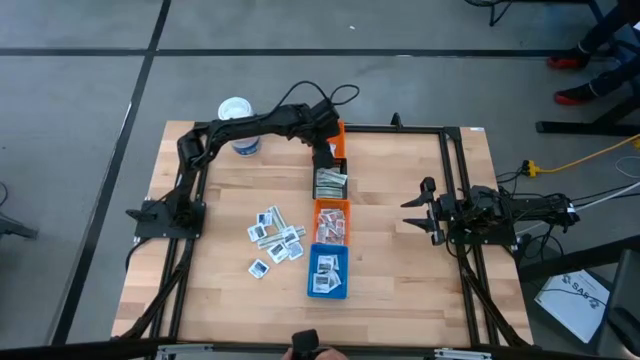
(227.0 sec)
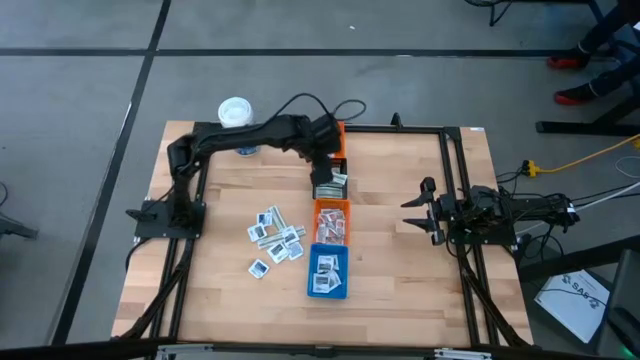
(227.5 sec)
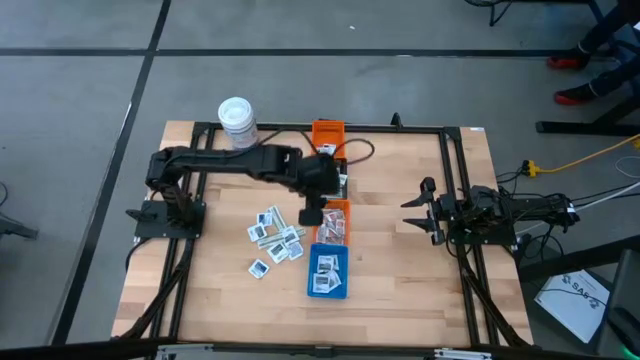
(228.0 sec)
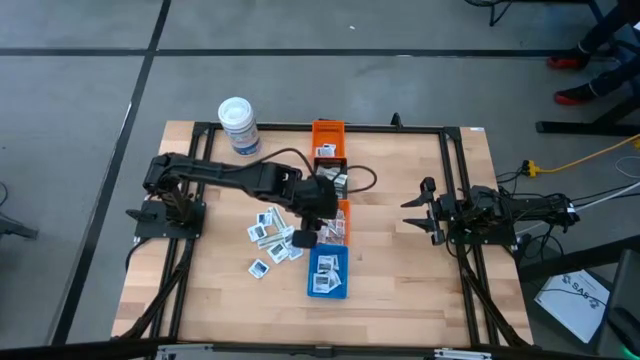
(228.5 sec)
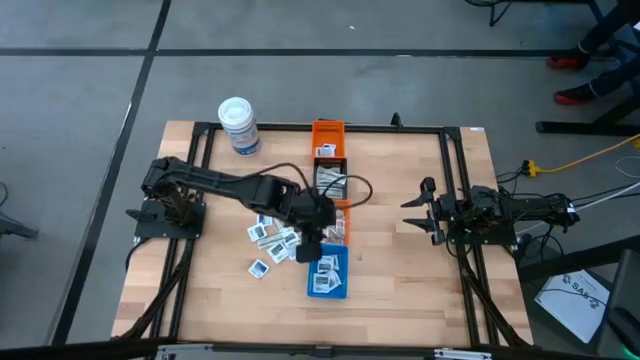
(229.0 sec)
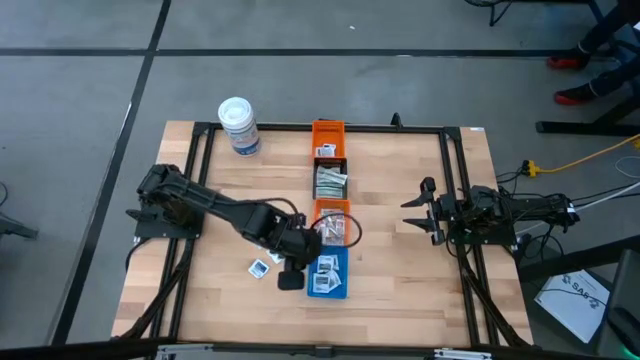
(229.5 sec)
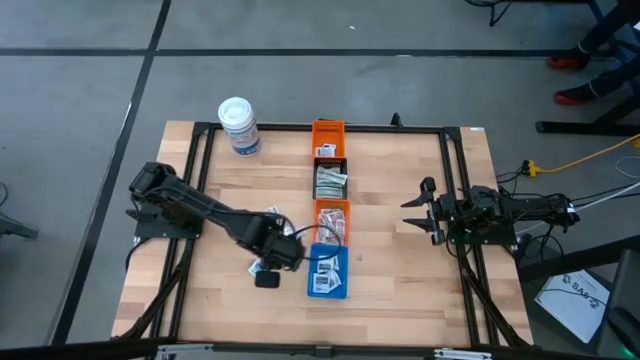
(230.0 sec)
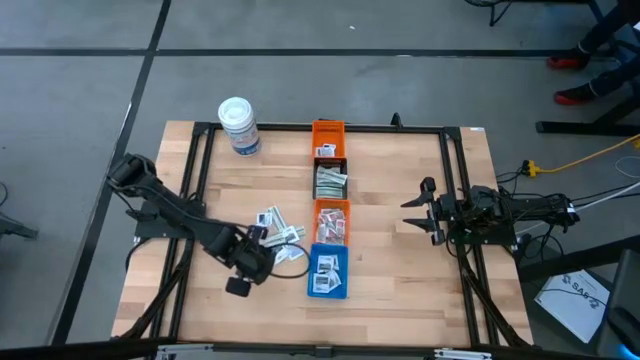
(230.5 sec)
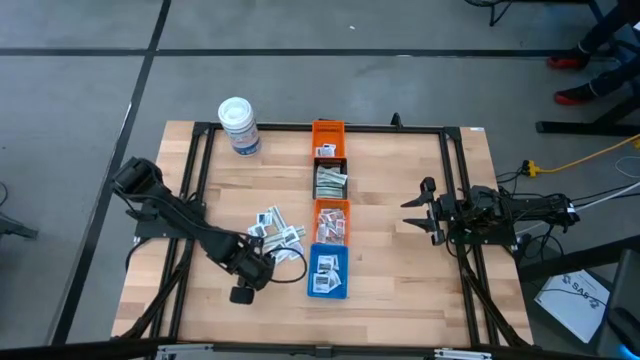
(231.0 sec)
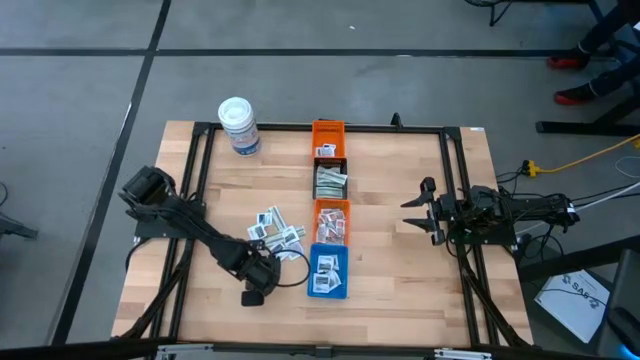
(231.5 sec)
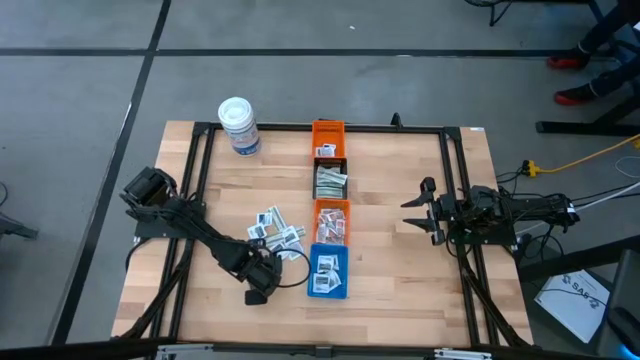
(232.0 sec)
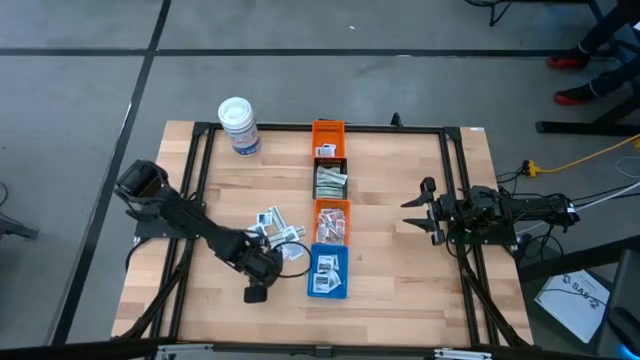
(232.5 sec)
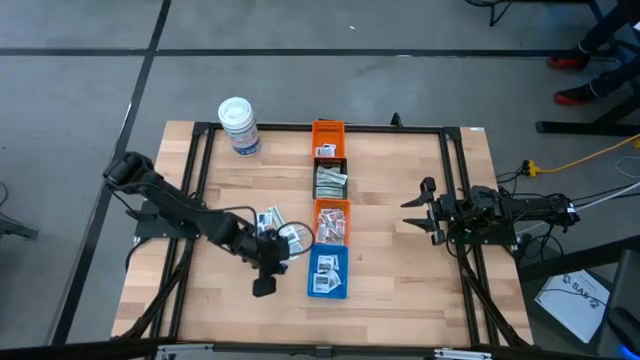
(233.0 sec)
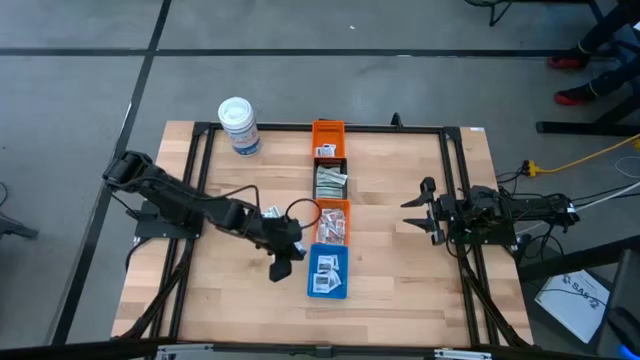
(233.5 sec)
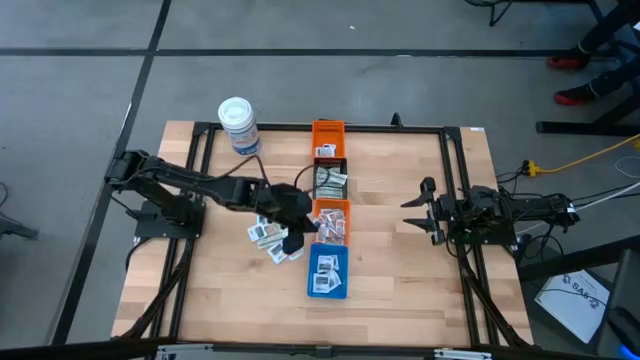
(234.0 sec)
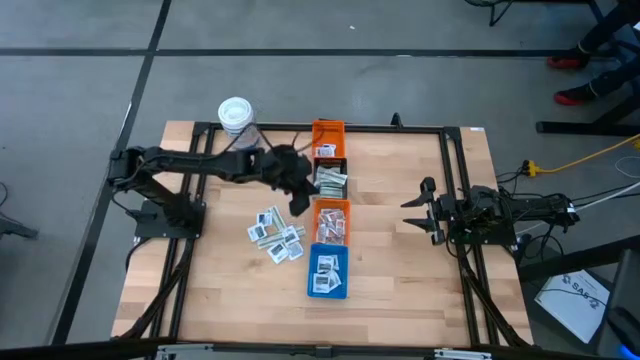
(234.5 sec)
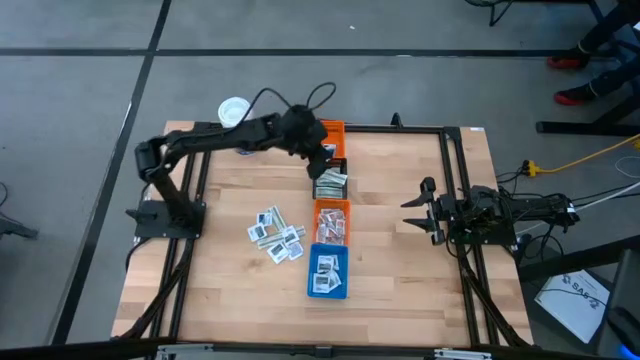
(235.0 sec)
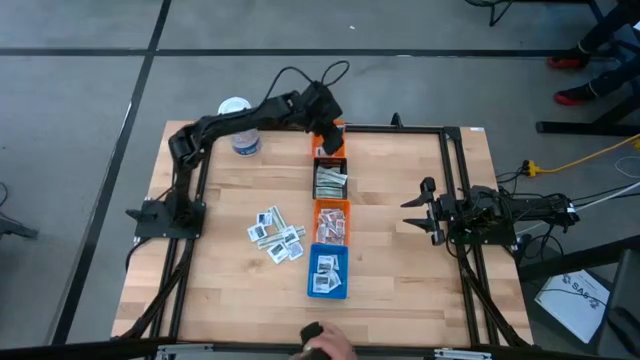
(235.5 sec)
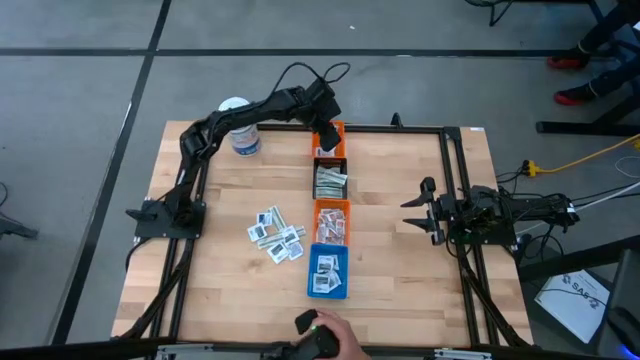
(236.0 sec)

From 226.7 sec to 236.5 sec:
Task: Pick & Place First Aid Supplies
Put the blue alcohol pad into the top orange bin

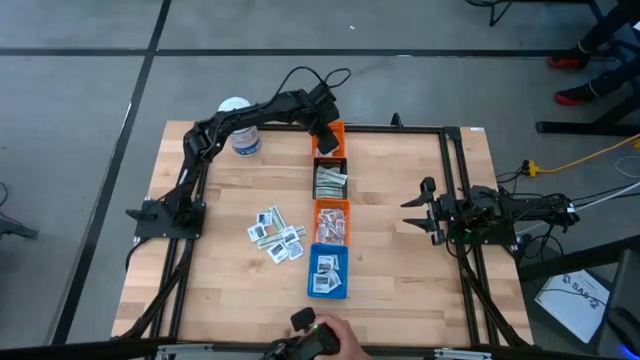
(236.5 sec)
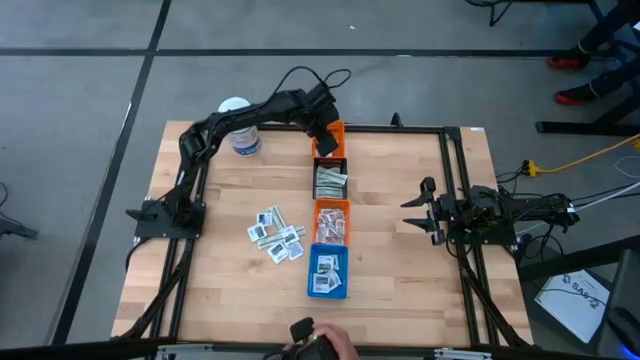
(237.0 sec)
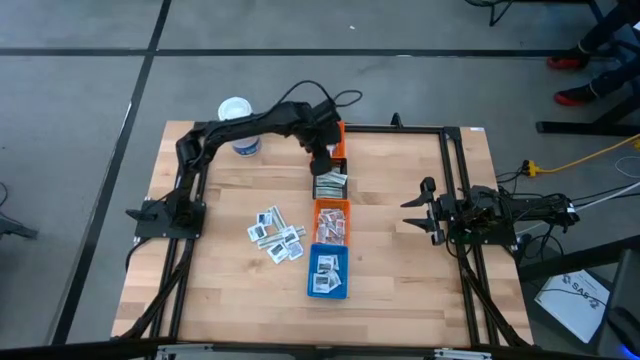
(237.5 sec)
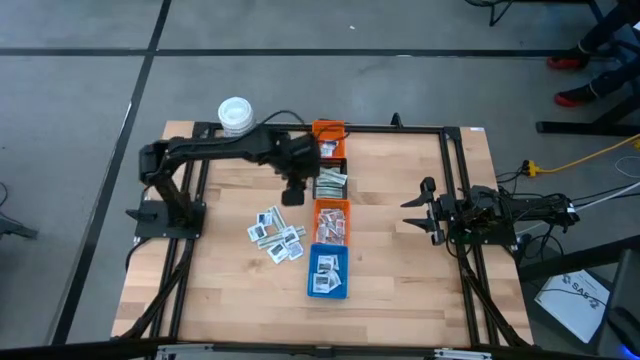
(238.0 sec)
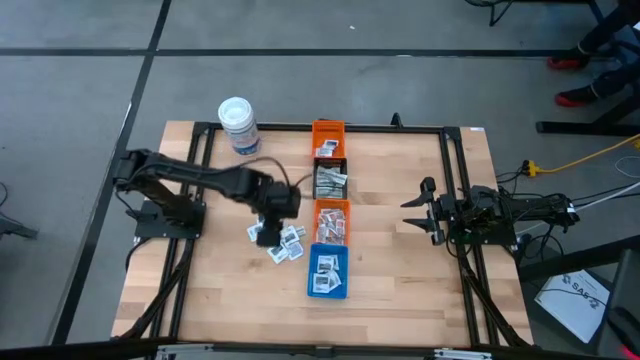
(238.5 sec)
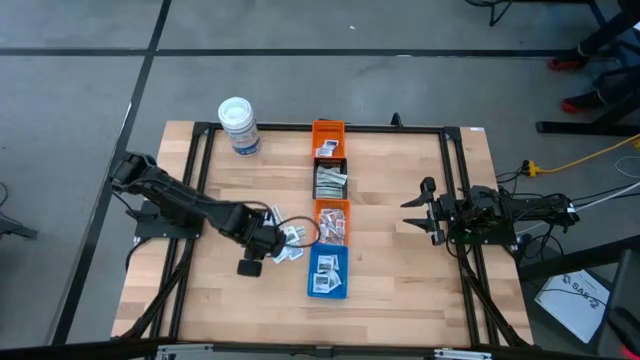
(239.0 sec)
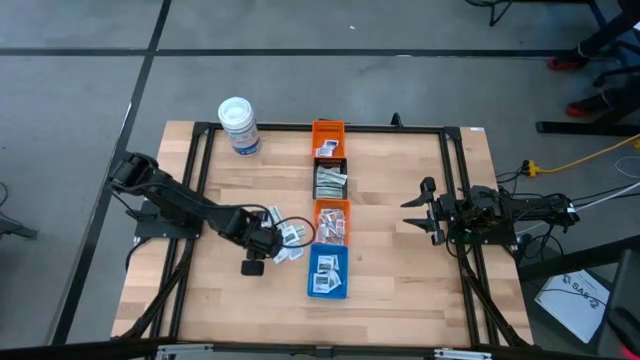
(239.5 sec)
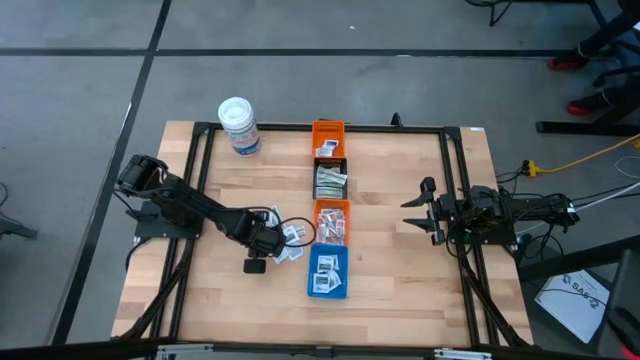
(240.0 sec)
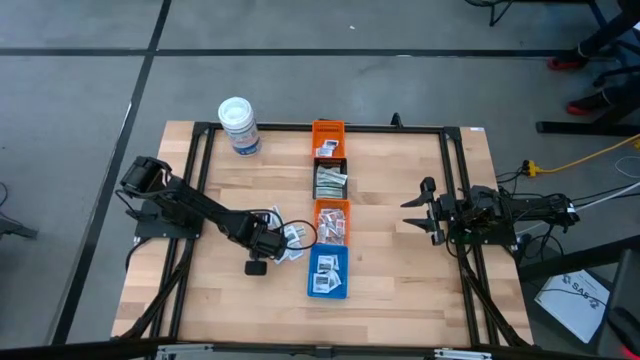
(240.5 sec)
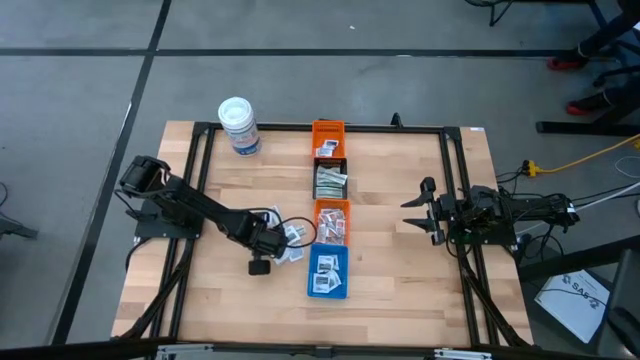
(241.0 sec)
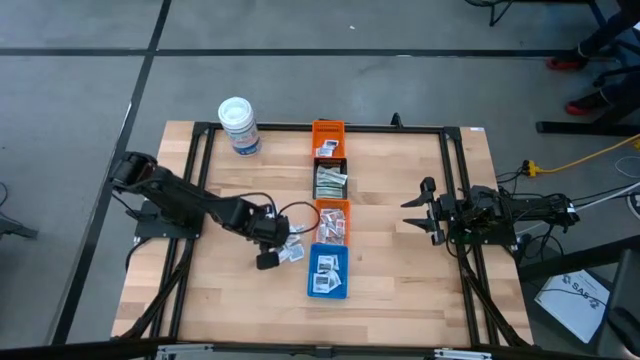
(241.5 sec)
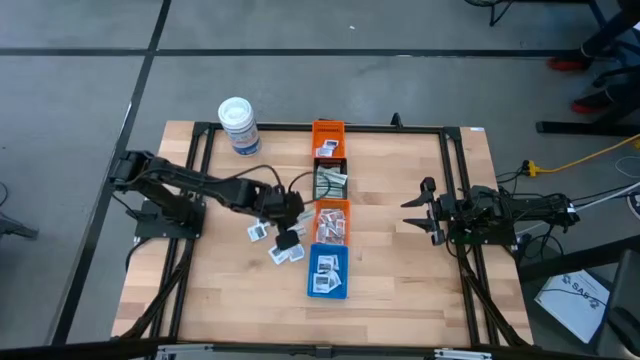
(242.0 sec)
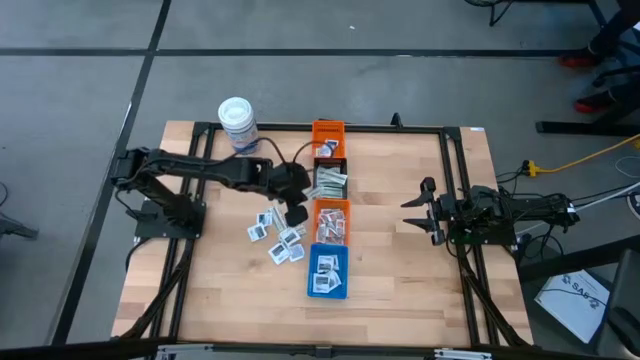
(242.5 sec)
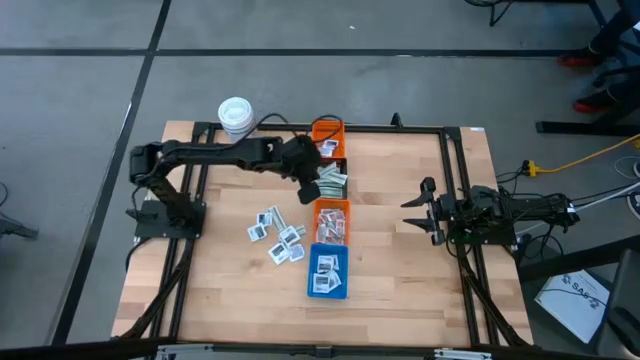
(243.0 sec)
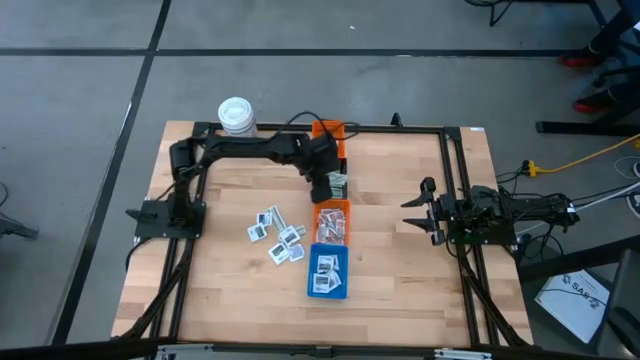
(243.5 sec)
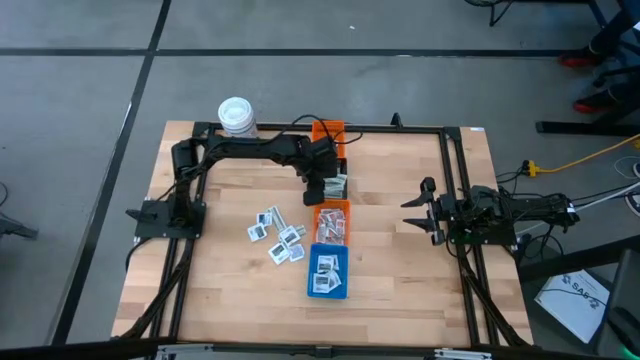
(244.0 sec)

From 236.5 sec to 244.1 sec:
Put the green bandage into the black bin

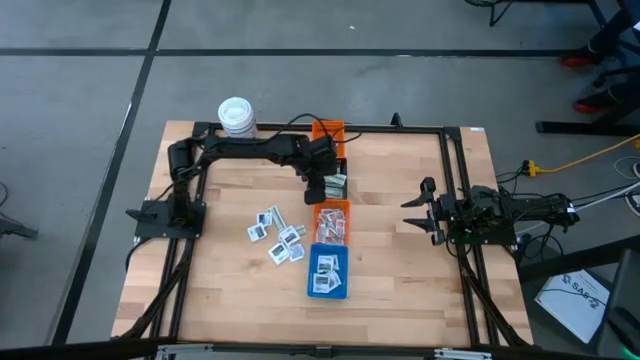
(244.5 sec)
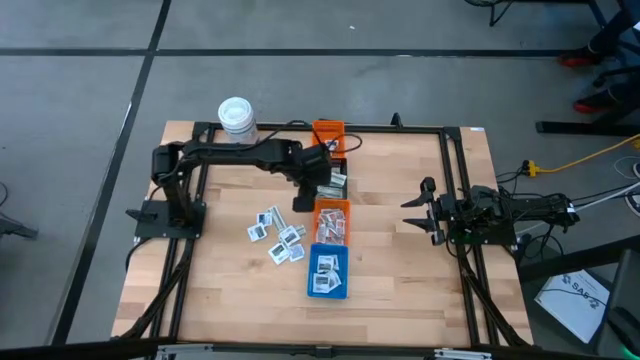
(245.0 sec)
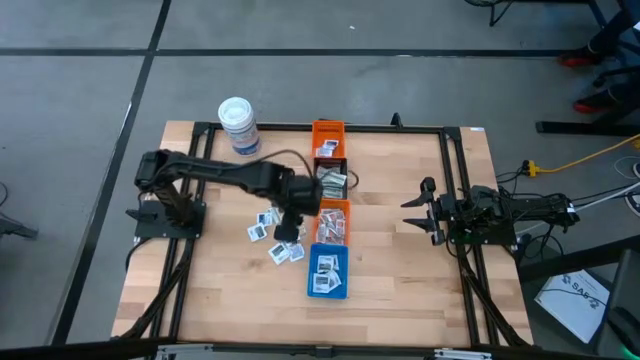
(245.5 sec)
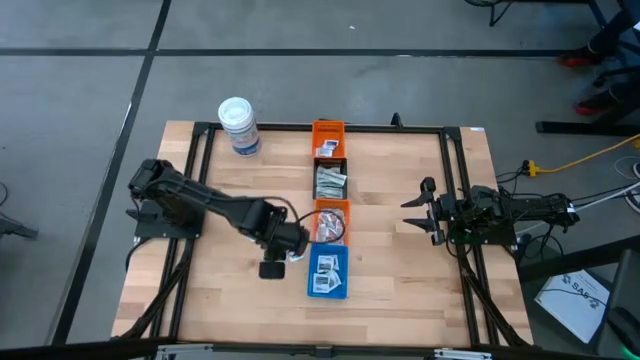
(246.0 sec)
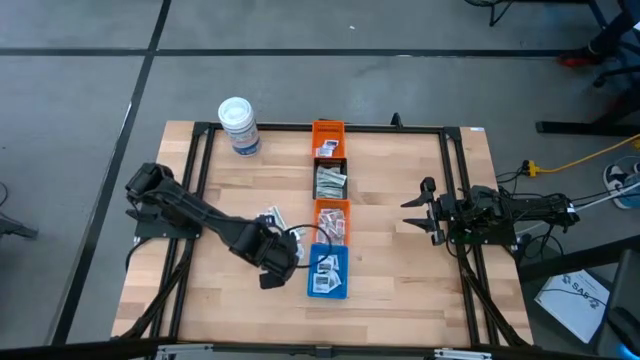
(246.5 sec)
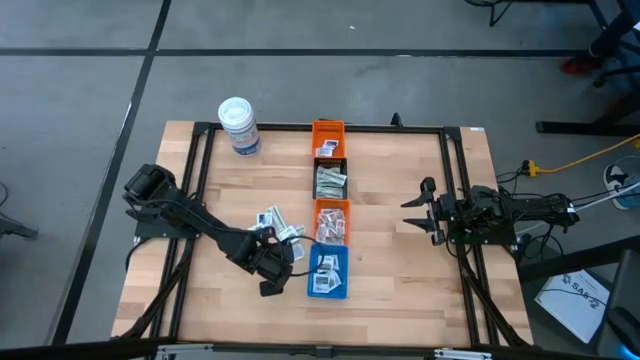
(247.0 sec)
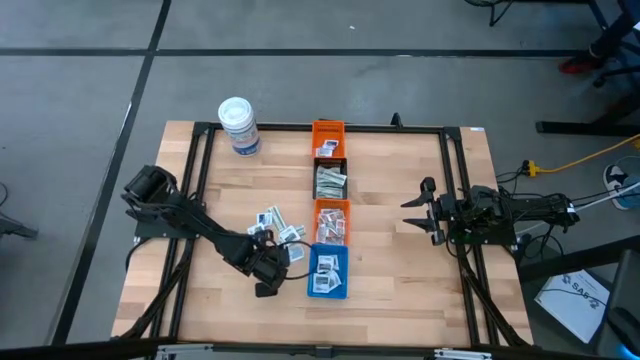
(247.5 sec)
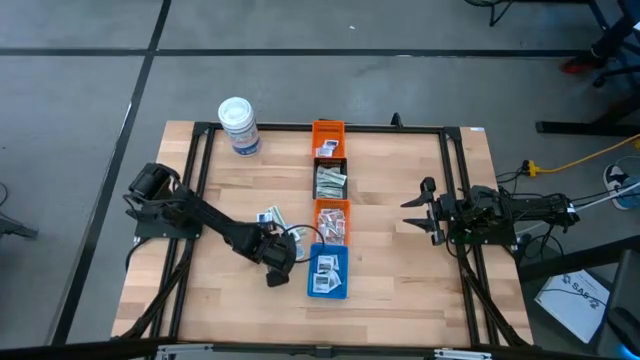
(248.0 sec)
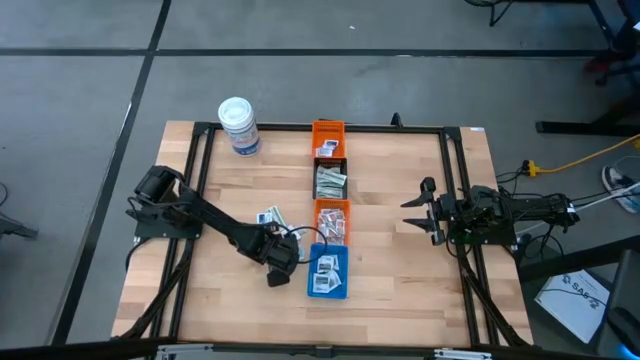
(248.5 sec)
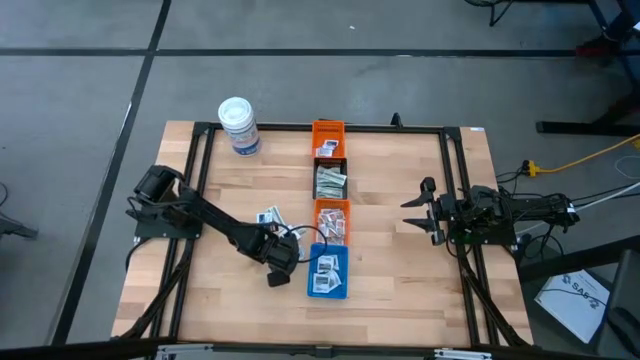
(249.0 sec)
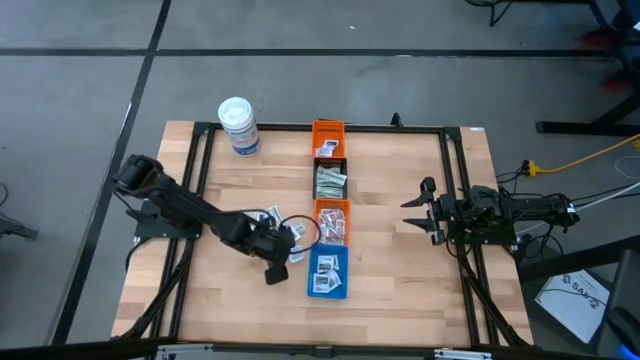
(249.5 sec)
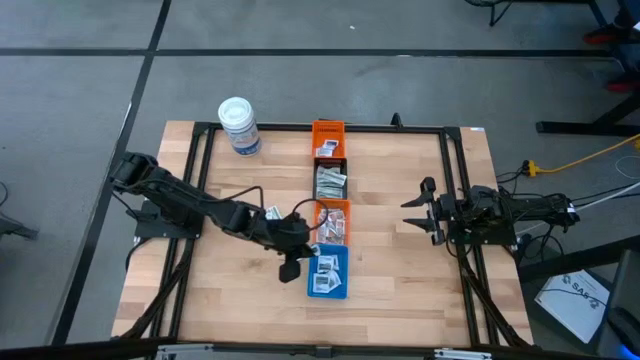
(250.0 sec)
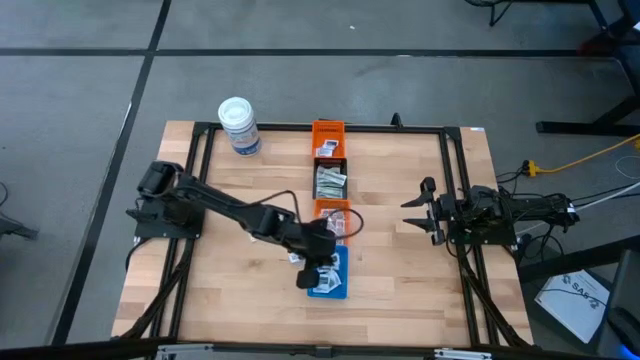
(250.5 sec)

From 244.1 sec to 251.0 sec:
Put the gray towelette pack into the blue bin
